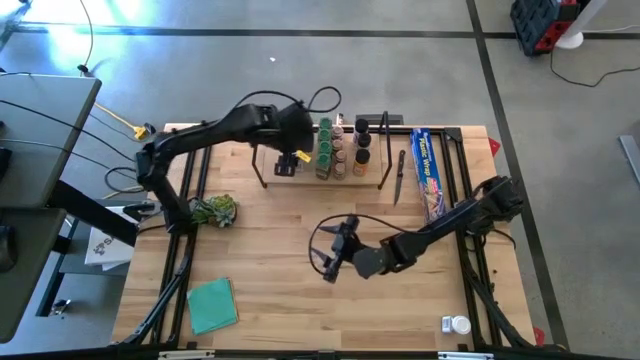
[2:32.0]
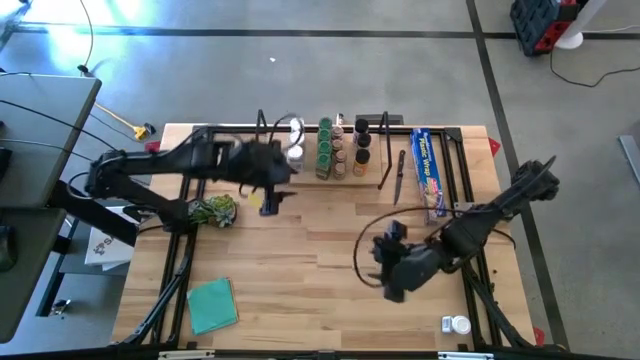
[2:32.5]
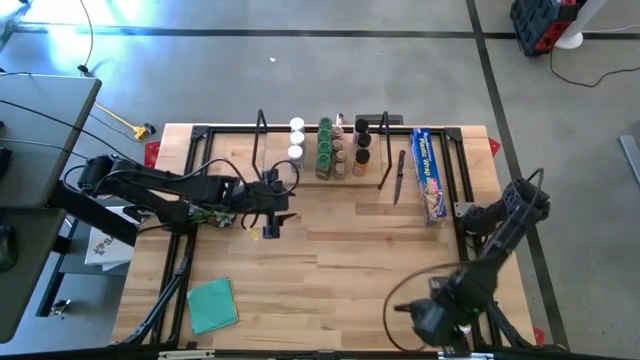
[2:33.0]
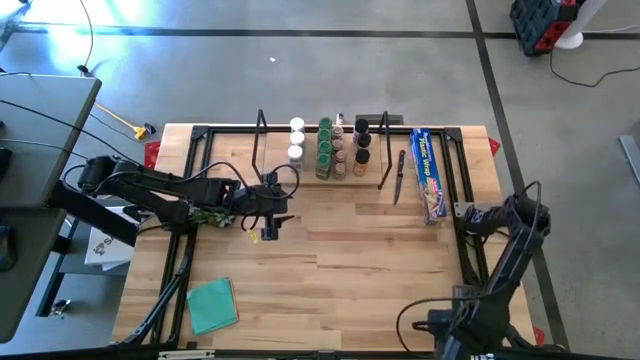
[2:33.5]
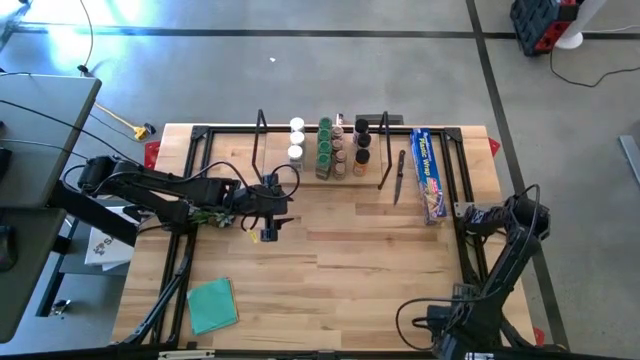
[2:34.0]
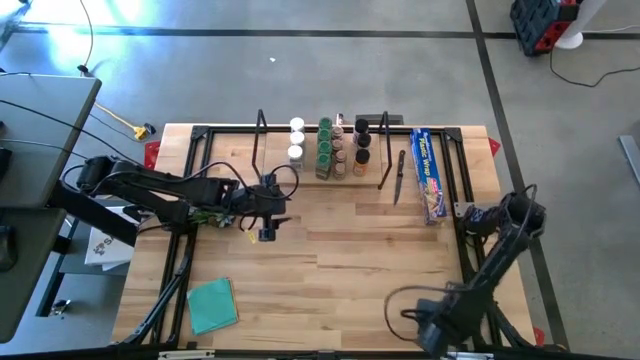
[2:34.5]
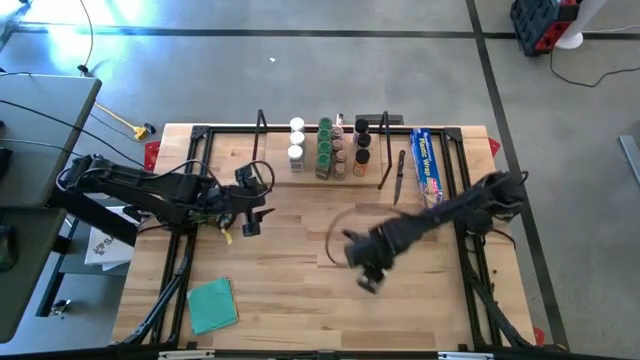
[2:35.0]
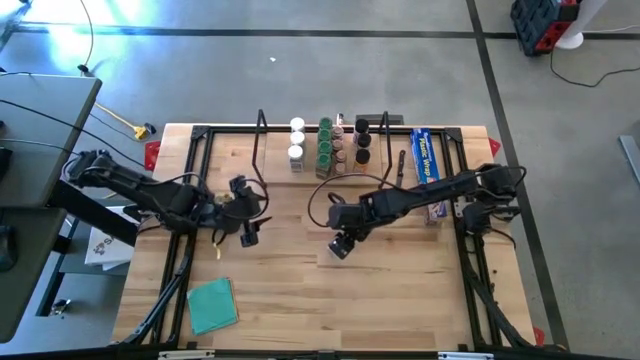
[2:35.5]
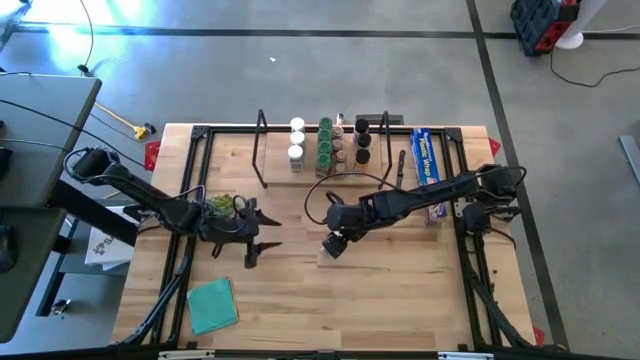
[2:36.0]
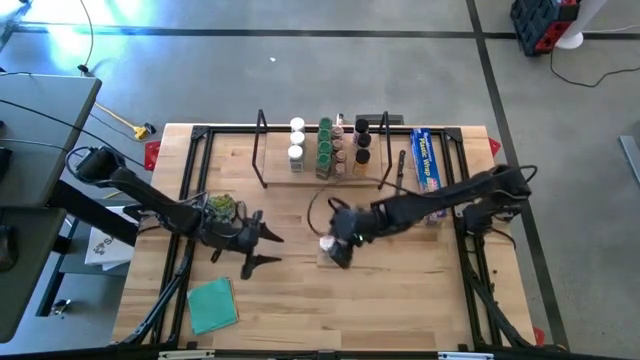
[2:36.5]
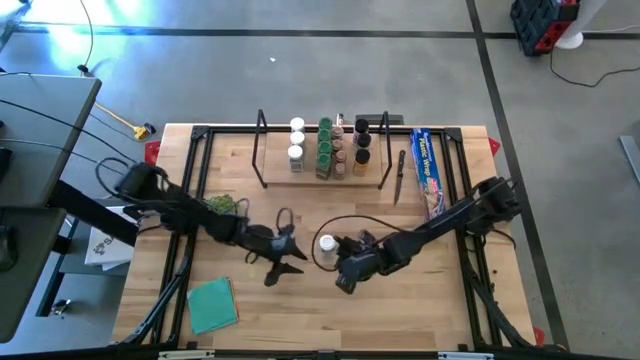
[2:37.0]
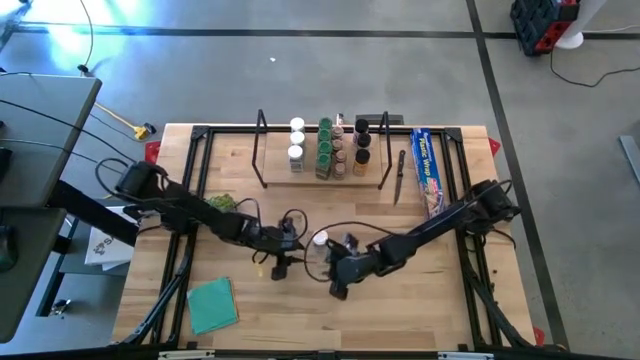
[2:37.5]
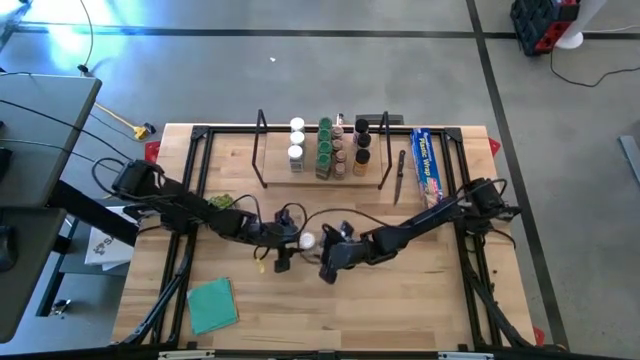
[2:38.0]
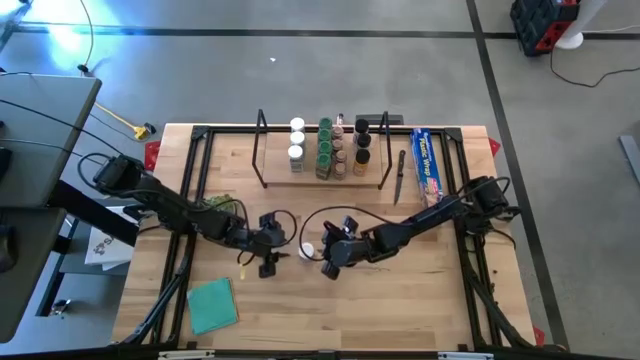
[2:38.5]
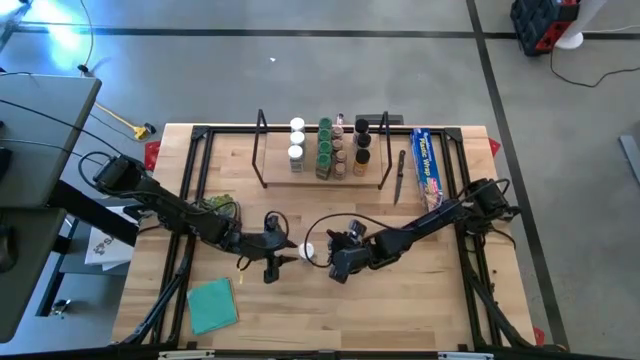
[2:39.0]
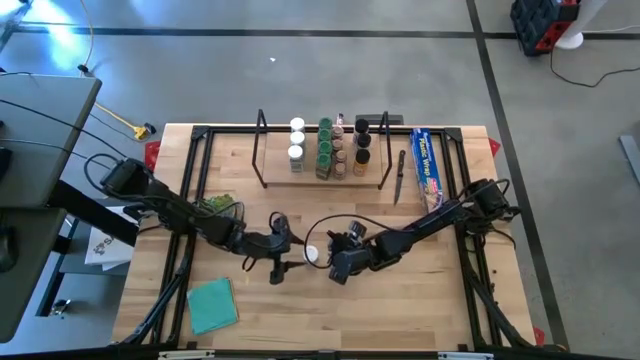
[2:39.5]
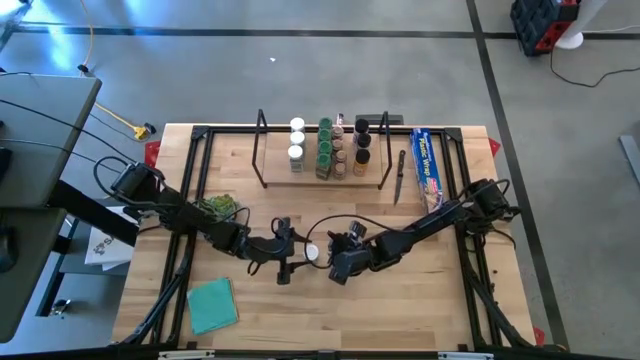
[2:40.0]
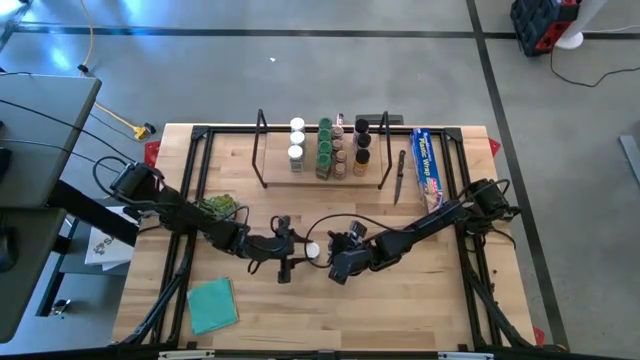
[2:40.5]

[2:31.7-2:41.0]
Task: Shelf spices
Put the white seasoning bottle on the shelf align with the other white seasoning bottle

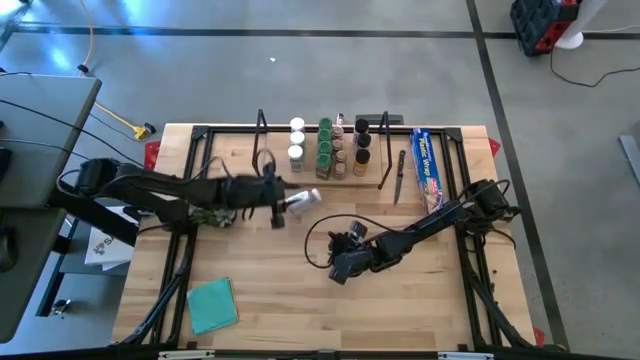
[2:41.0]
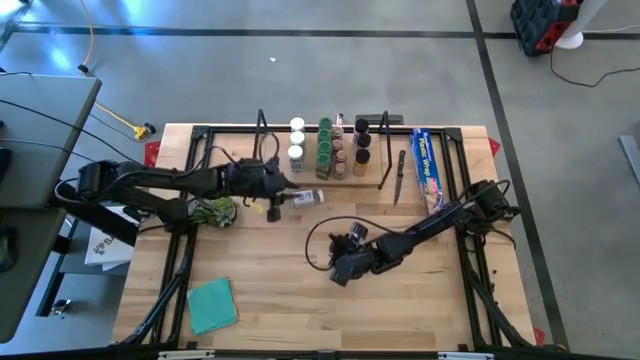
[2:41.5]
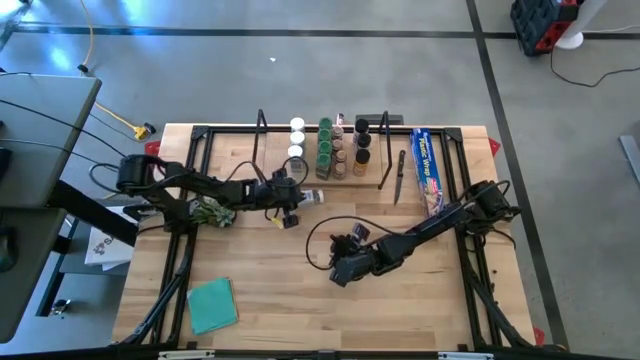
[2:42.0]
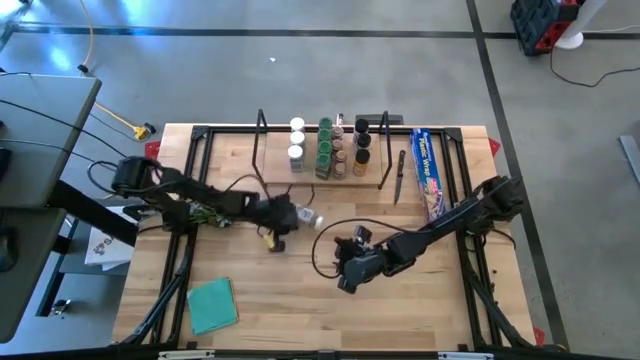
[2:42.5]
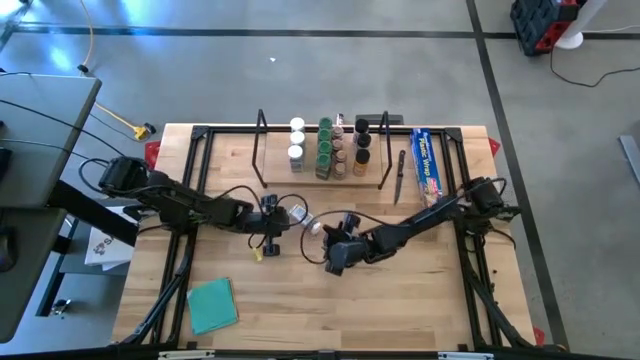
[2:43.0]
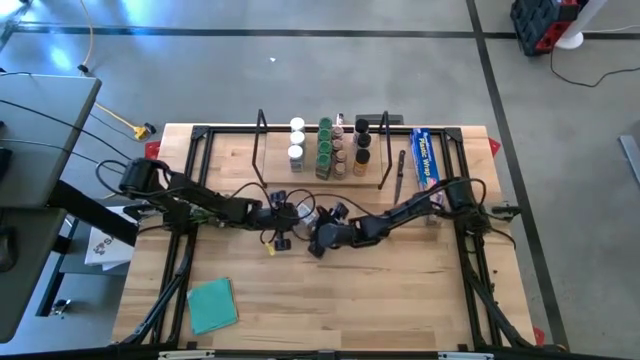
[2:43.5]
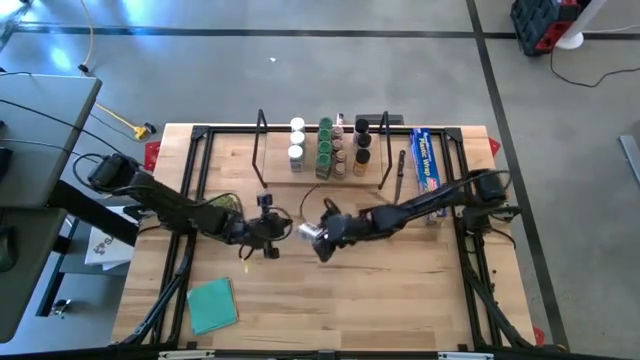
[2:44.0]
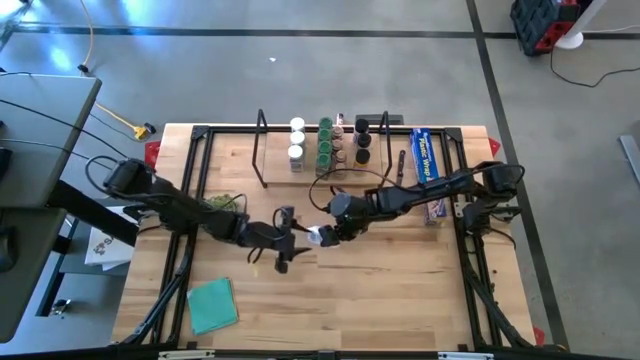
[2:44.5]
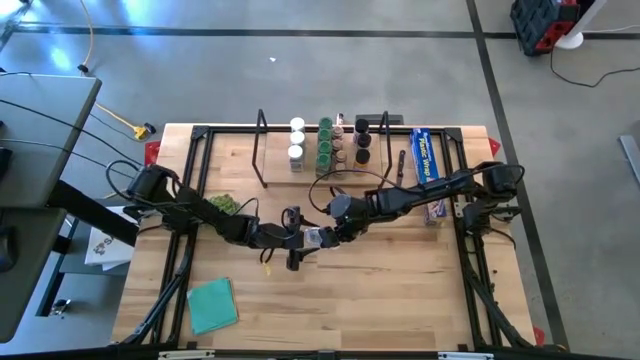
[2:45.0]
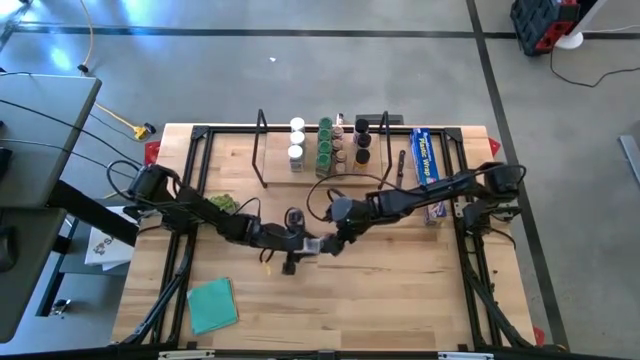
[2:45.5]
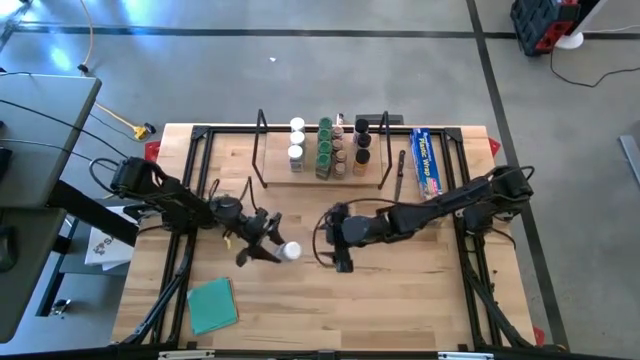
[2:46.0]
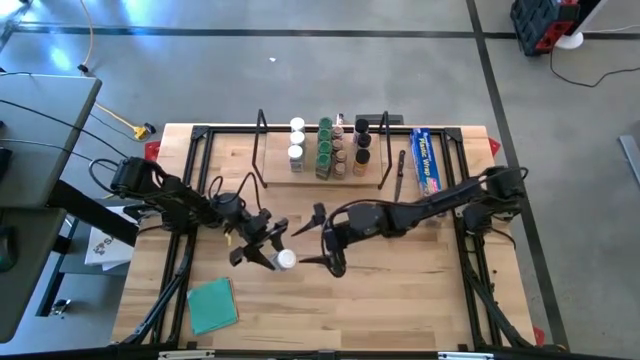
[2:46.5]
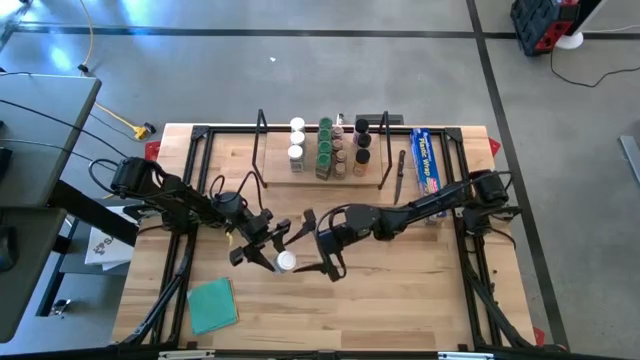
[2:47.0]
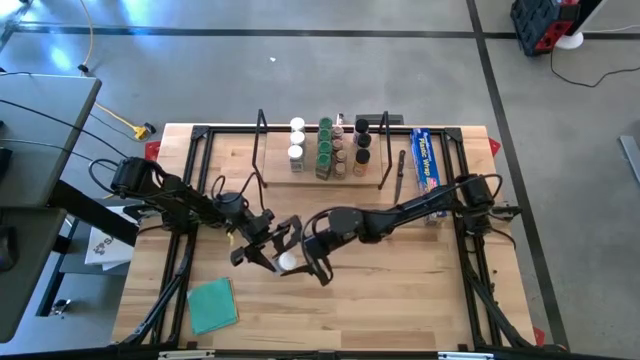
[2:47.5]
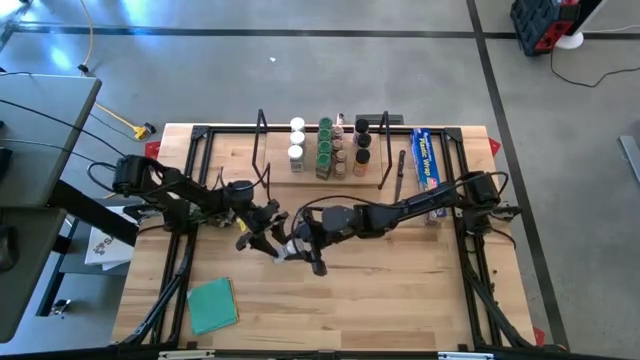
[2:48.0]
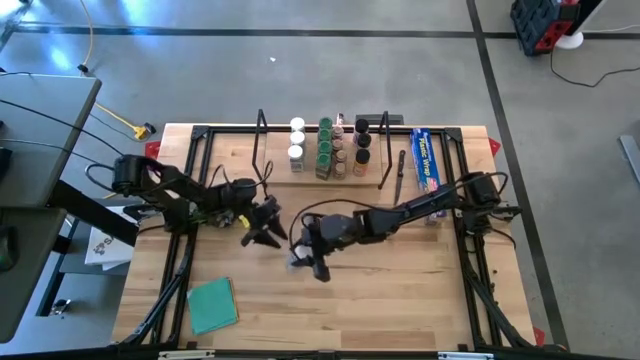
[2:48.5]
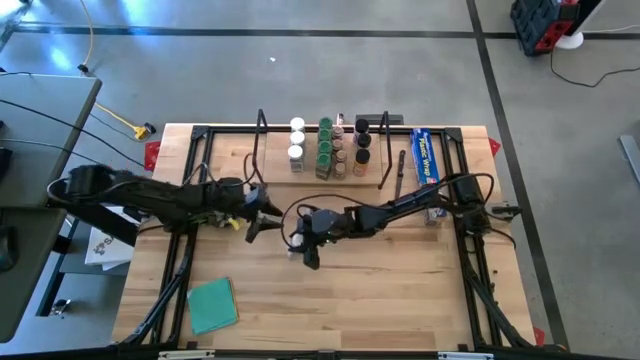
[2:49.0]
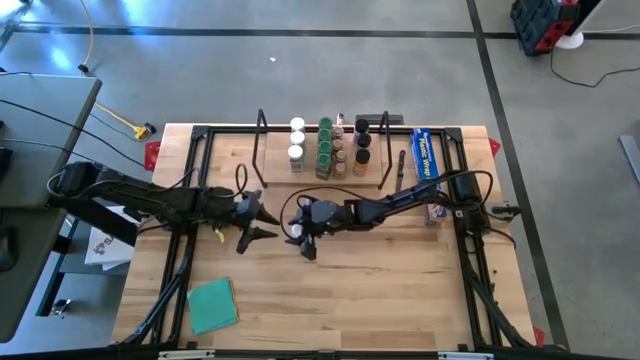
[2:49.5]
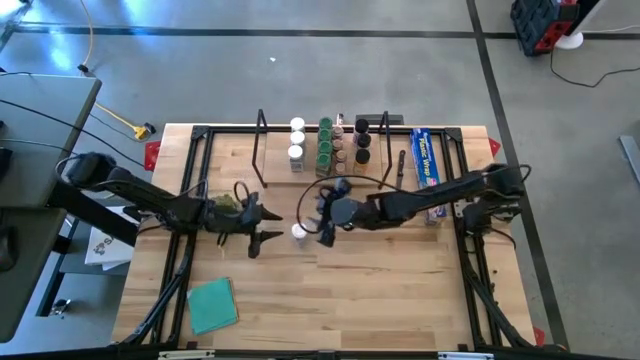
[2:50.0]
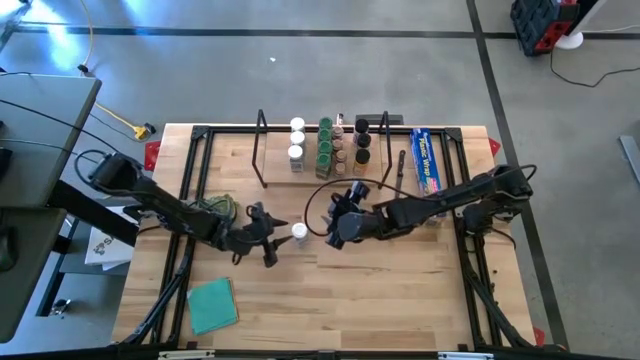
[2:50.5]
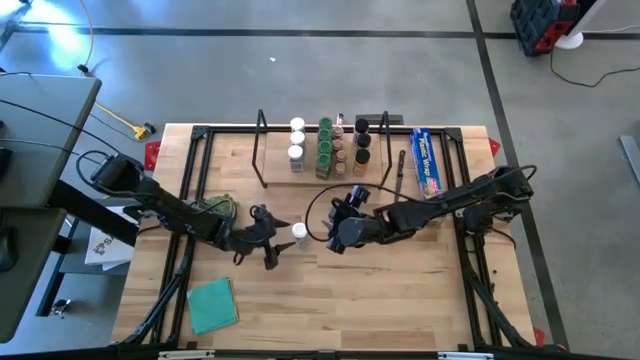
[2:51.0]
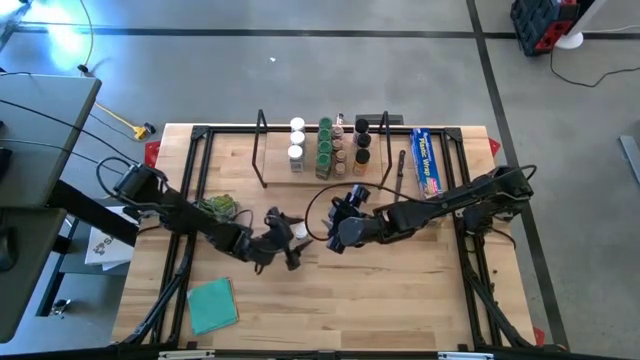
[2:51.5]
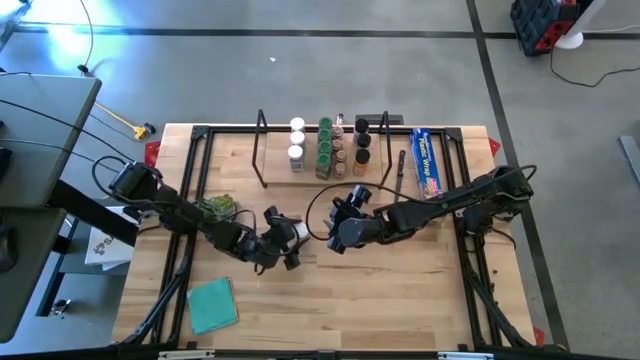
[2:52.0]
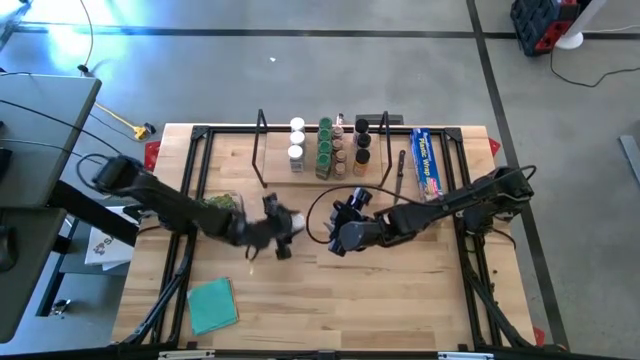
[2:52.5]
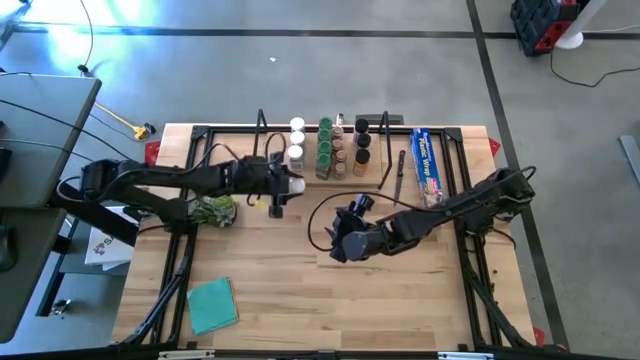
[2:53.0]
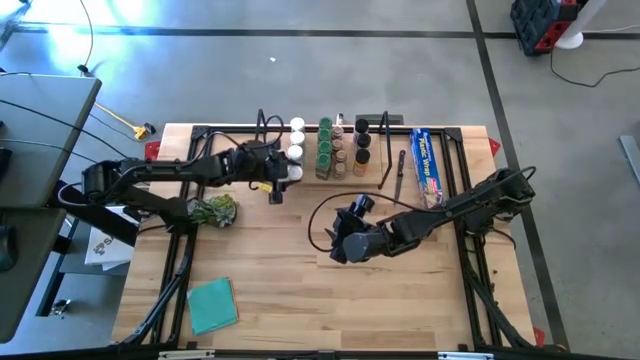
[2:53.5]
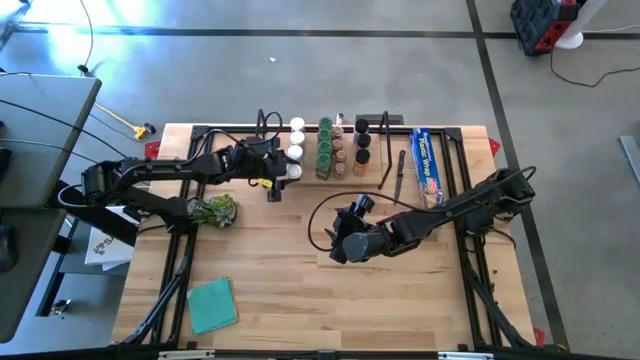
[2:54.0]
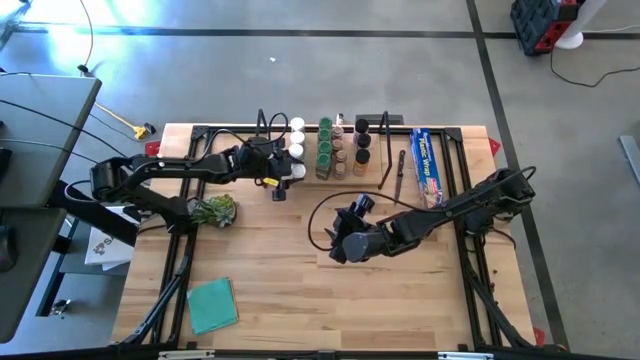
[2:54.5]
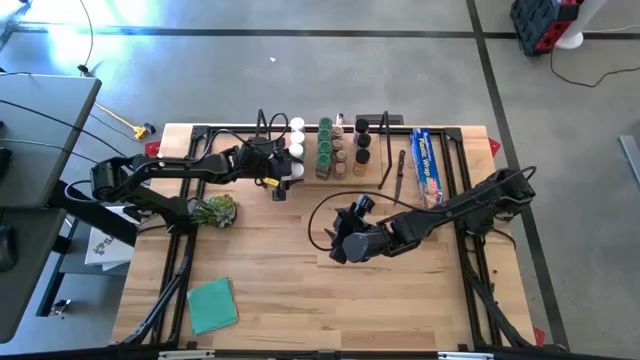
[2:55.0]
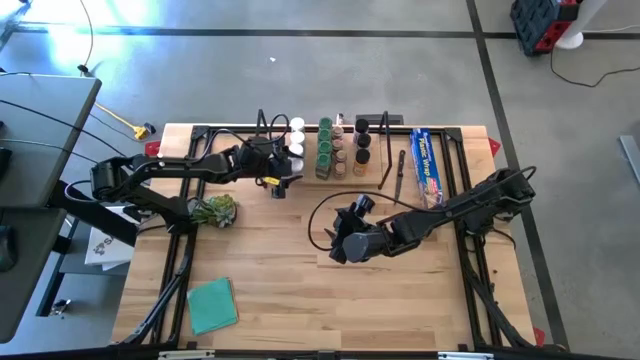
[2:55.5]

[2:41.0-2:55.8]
Put the white seasoning bottle on the shelf align with the other white seasoning bottle
